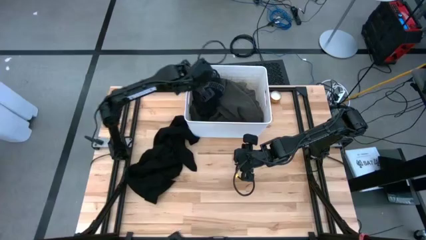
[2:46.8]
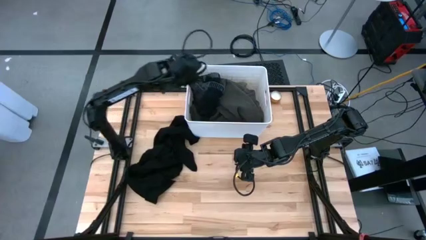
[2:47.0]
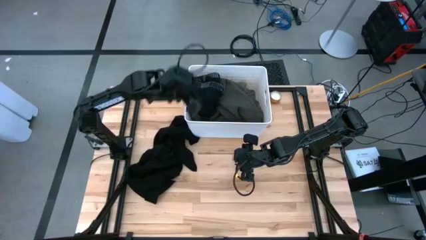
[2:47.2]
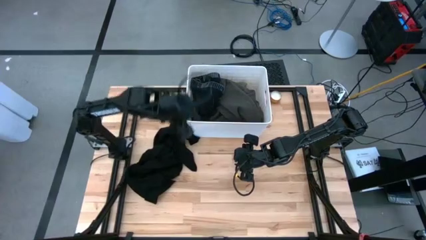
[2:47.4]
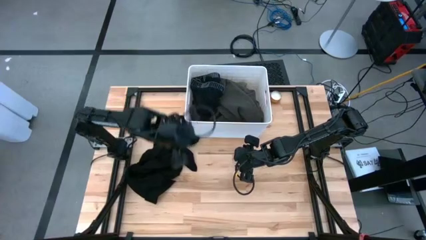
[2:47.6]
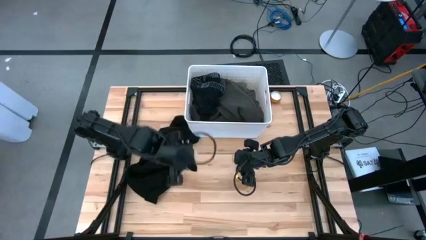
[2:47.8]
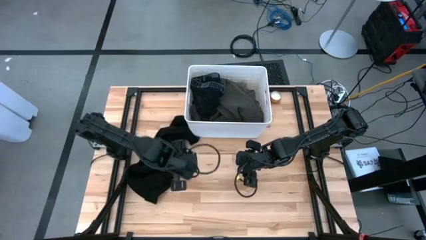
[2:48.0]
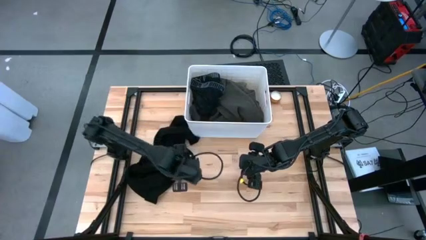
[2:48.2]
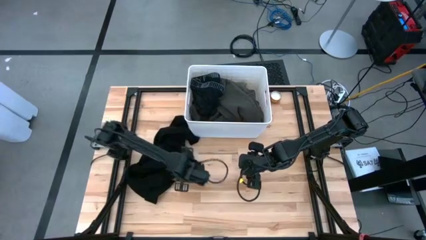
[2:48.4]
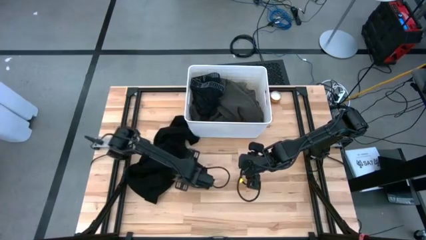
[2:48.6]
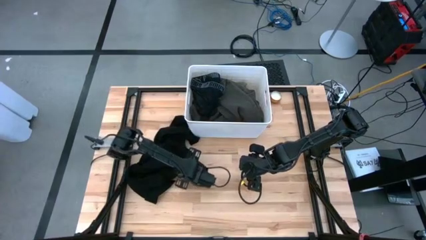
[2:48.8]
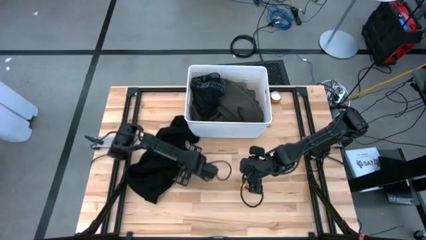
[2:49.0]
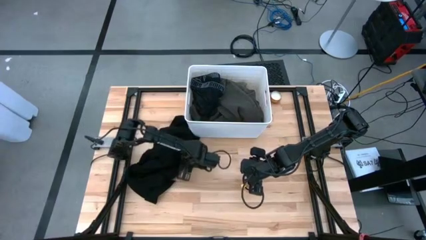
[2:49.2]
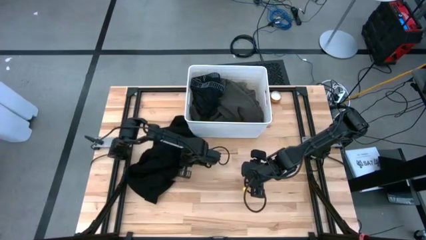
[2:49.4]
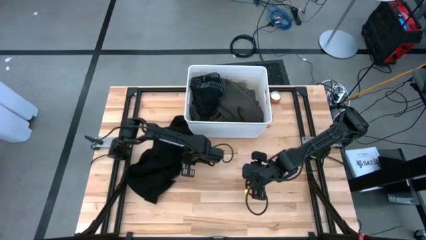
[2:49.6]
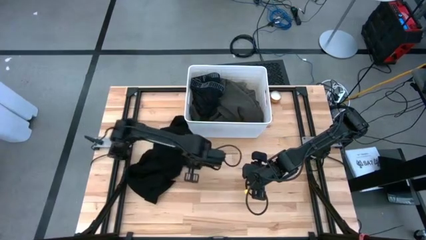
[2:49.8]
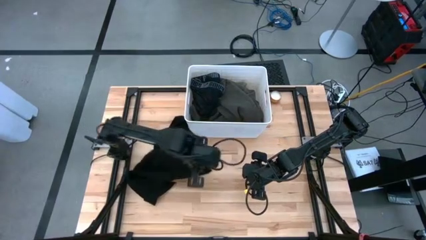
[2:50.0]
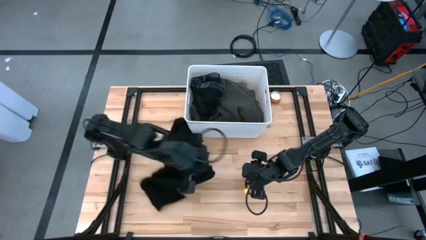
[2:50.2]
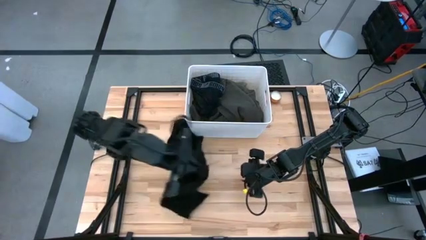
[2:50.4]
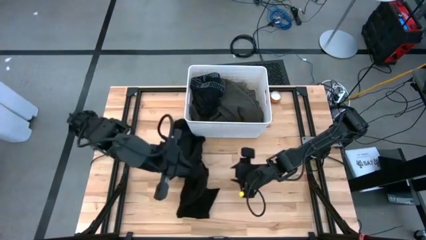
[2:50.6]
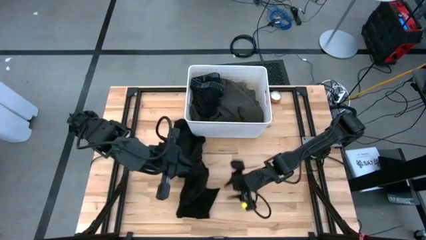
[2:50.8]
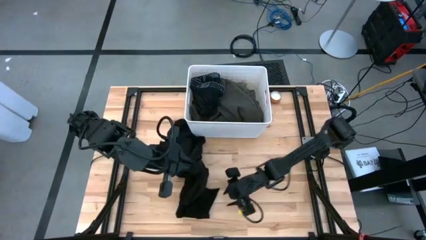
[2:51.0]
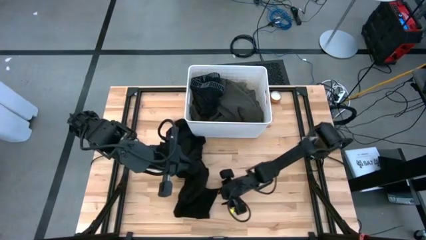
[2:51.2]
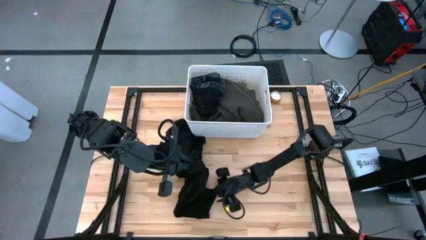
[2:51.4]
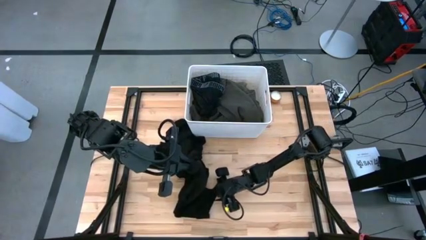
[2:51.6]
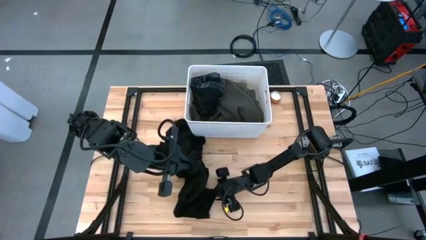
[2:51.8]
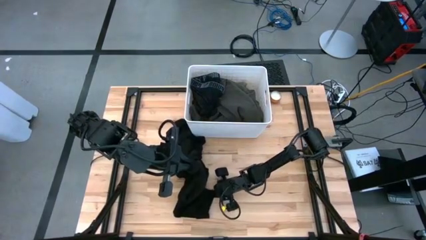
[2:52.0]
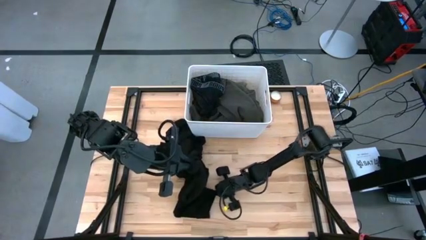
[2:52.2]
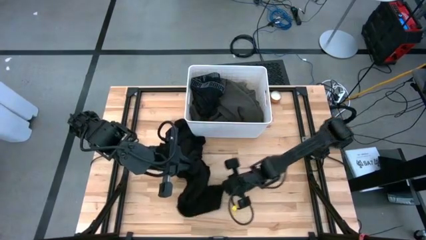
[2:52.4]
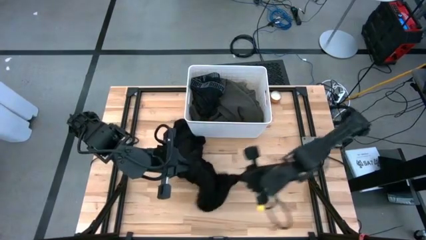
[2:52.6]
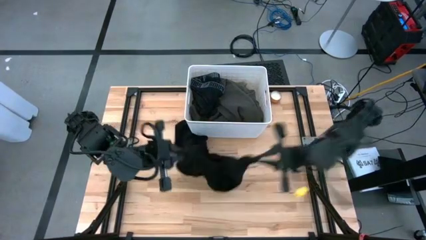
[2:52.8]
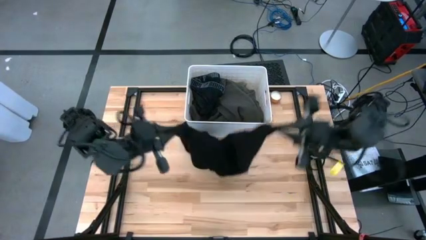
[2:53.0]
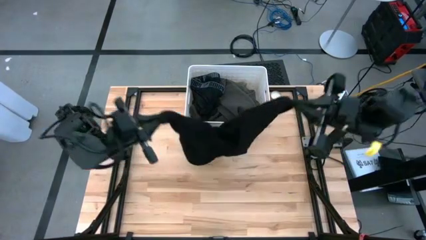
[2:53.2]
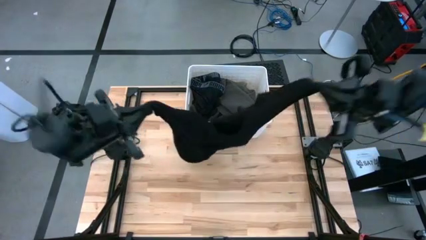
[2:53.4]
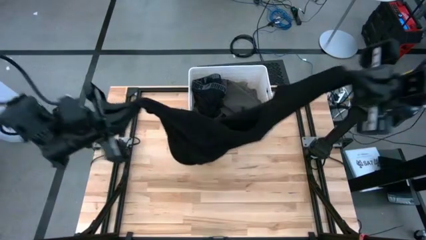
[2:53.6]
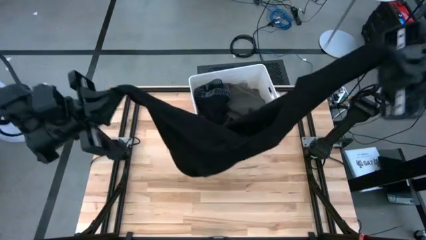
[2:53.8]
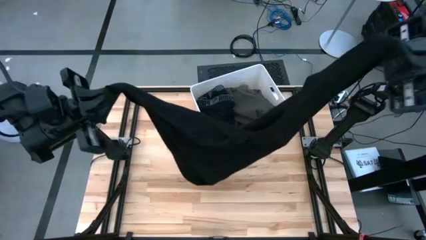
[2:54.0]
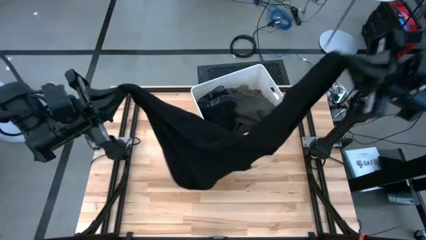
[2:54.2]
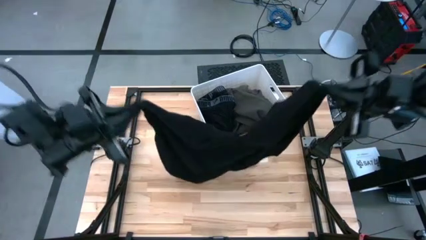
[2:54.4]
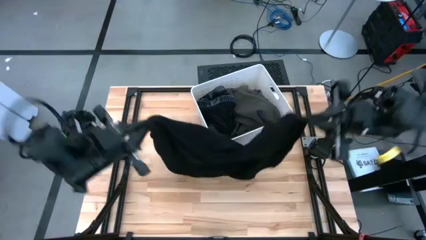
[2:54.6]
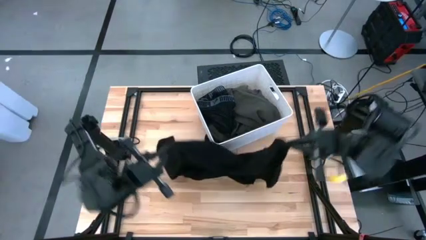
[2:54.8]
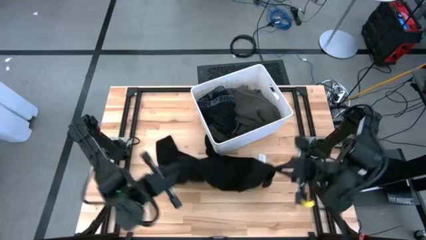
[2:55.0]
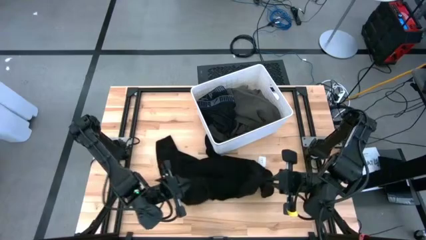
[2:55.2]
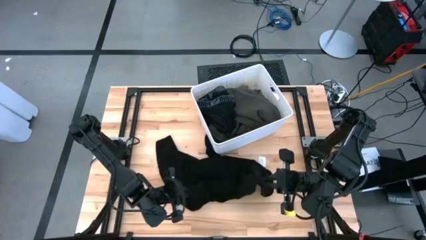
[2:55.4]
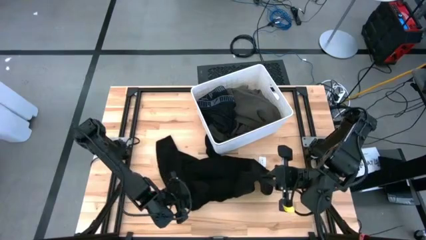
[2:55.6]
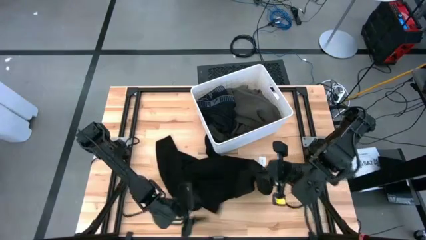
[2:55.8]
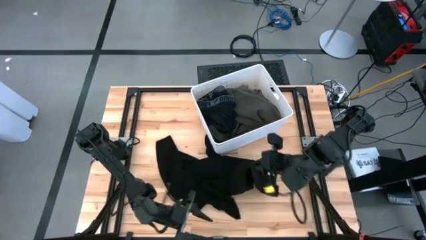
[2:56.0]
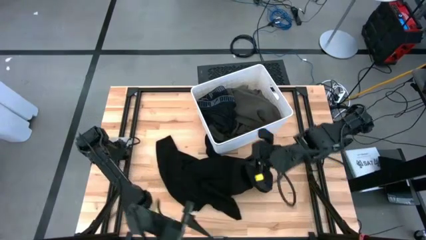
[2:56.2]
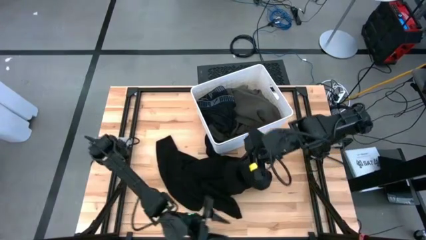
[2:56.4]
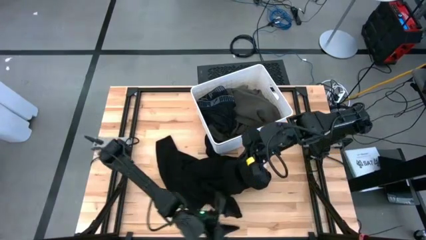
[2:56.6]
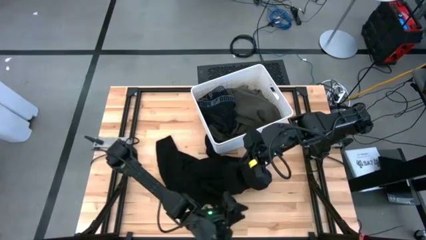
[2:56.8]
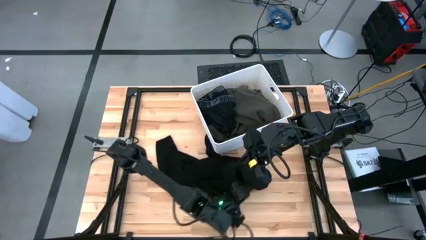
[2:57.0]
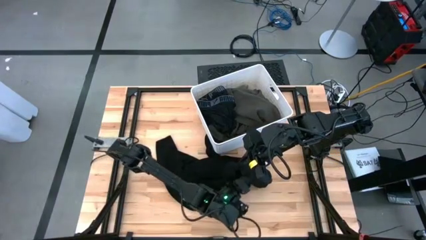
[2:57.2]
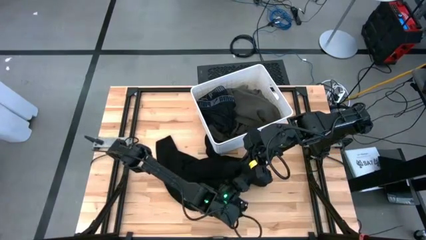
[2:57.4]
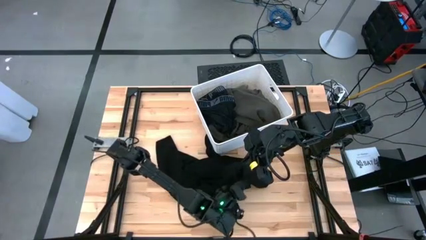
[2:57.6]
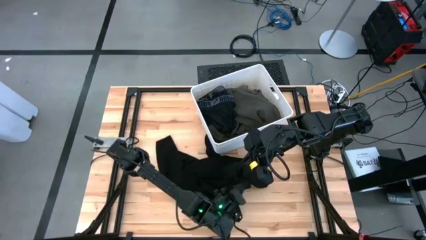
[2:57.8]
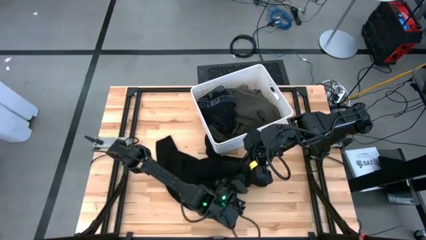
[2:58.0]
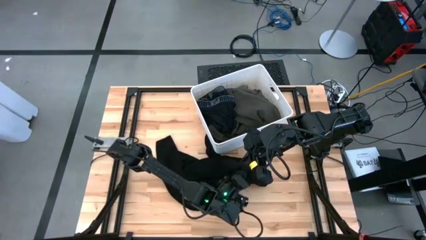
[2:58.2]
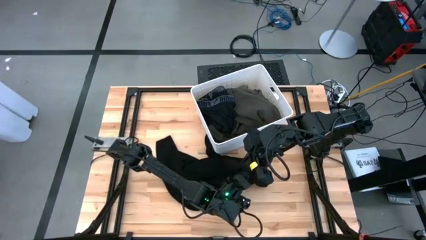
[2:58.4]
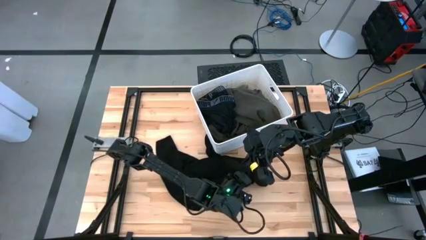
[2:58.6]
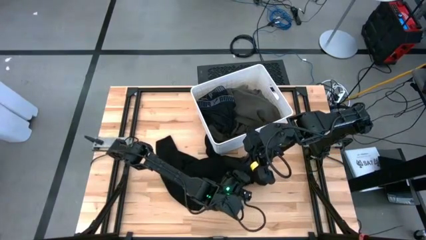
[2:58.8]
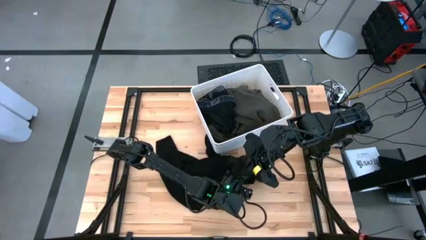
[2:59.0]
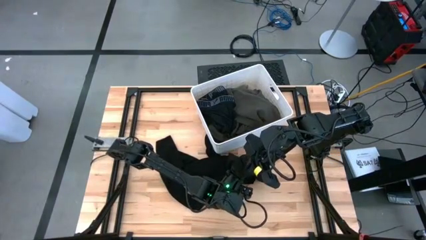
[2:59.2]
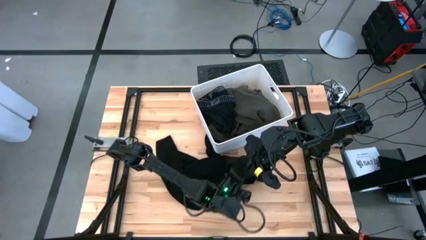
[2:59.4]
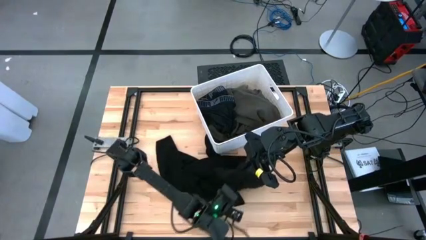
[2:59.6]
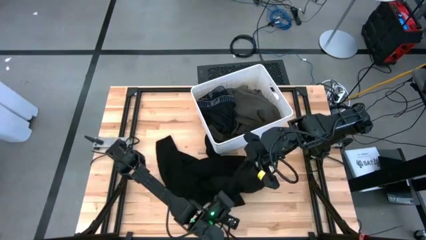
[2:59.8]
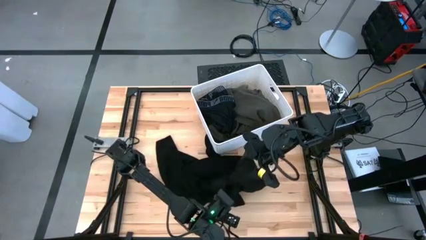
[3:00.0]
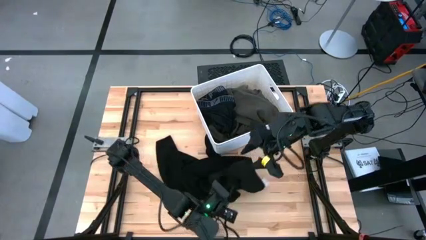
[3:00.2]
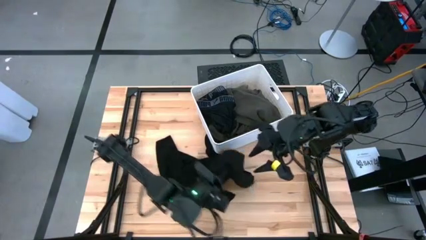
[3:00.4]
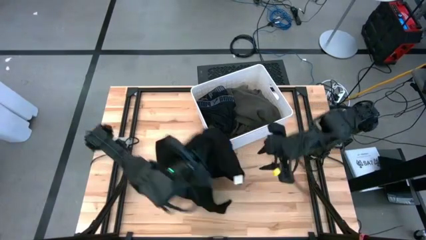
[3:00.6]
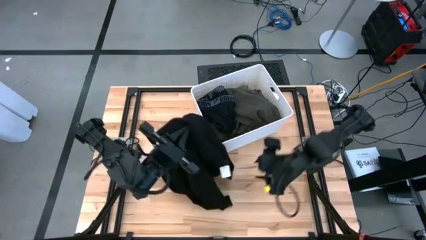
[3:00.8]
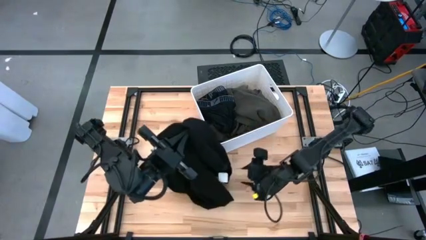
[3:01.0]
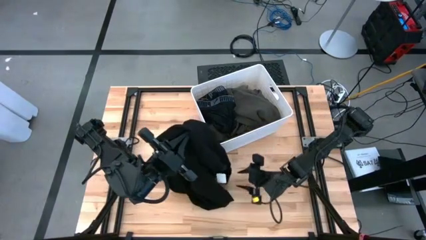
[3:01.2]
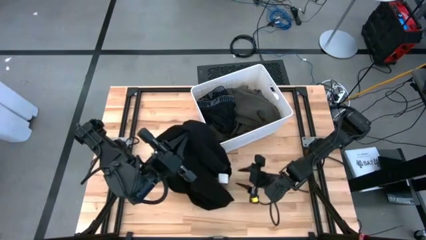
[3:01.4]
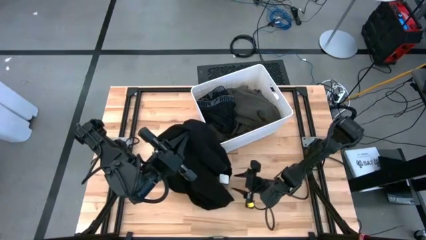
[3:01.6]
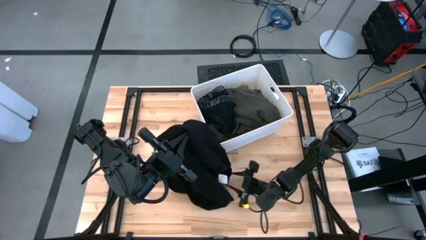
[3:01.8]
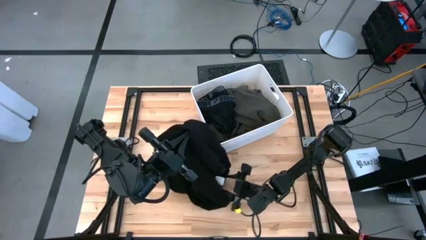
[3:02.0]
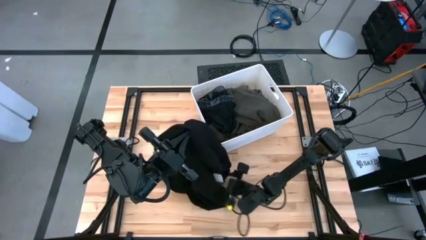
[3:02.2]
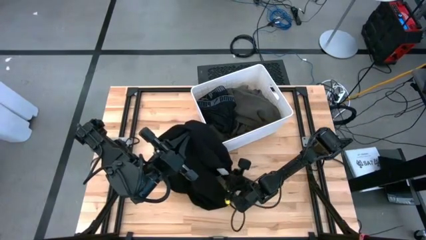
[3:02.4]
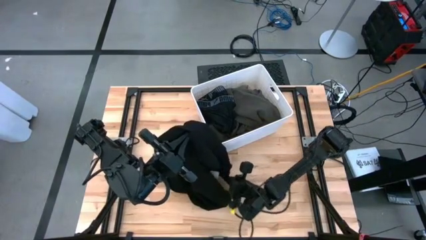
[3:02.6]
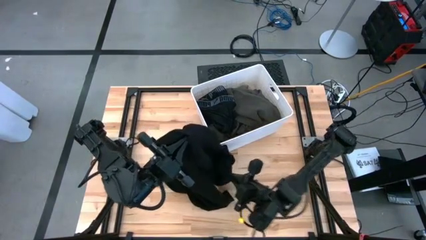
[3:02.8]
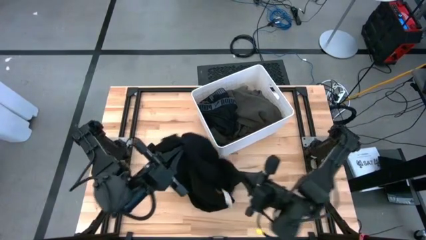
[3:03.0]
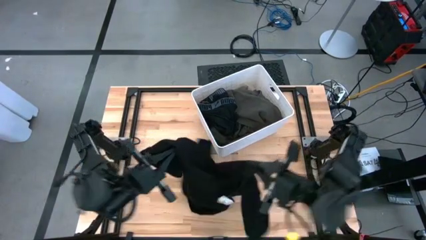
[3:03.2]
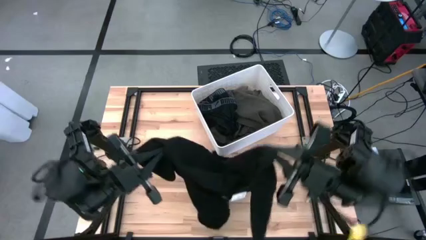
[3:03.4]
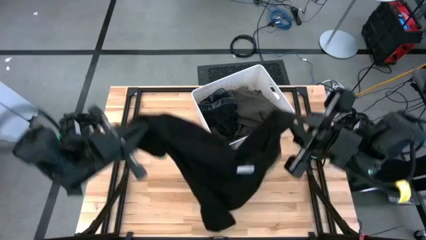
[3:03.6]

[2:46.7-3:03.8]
Task: Sort clothes
Put the black shirt into the white bin

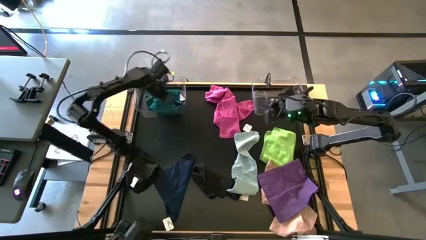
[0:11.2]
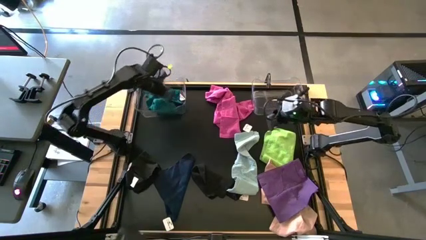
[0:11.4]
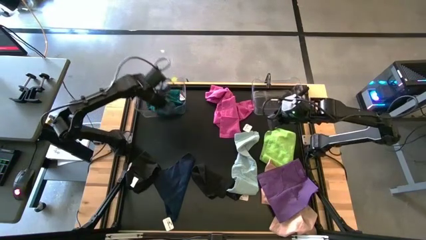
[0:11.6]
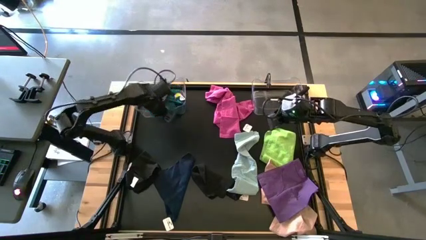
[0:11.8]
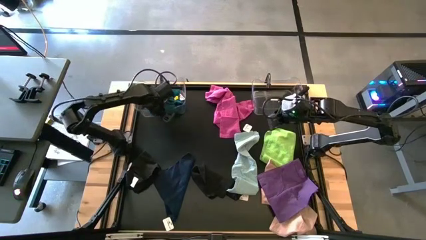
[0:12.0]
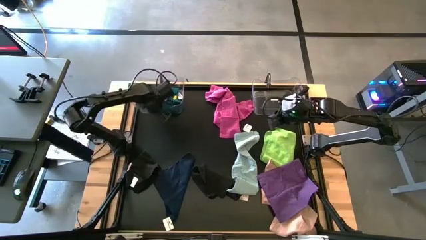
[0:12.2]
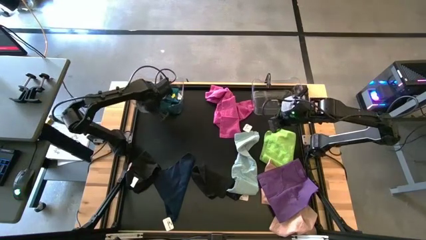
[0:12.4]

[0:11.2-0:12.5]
Task: Sort towels by color in basket
Adjust the left transparent bin on the table
